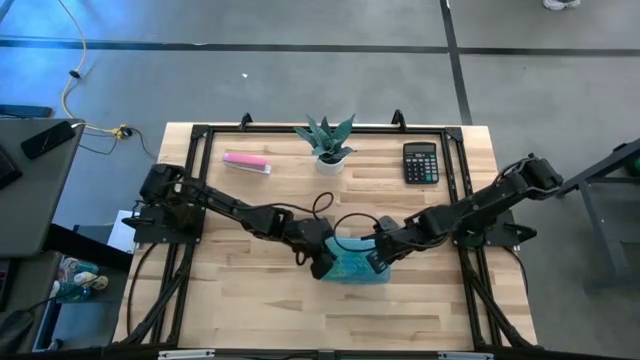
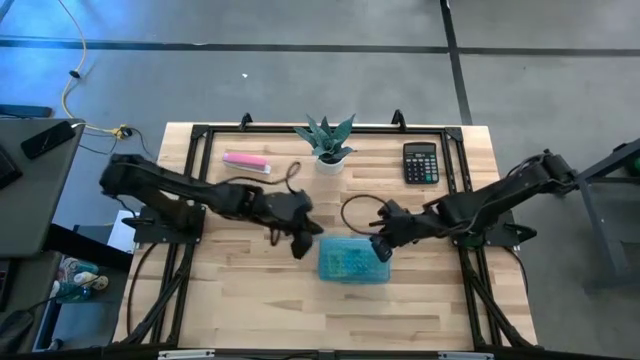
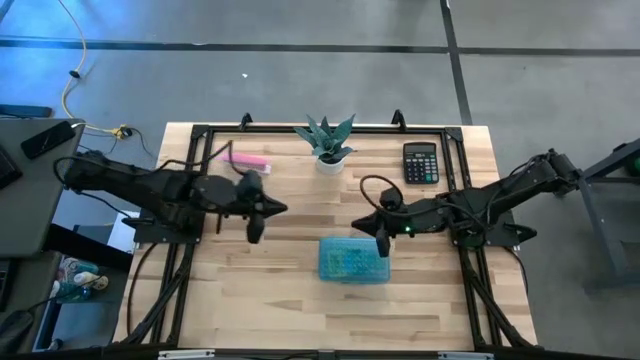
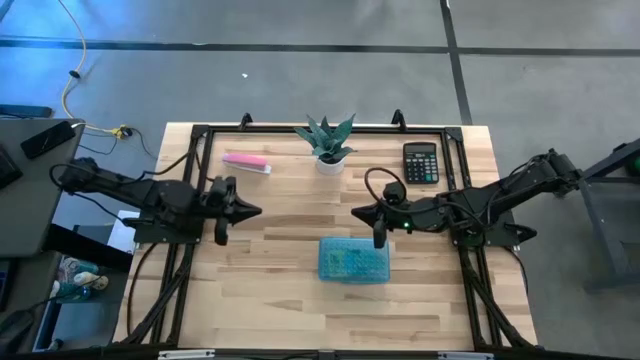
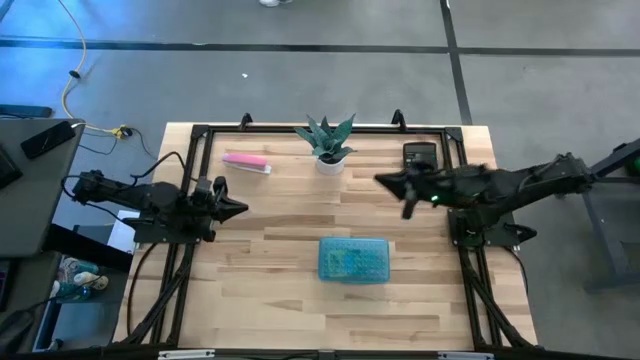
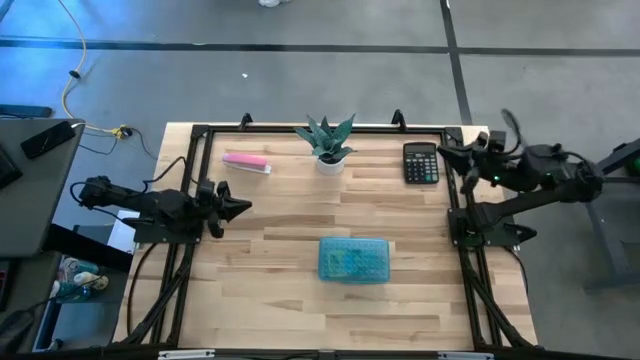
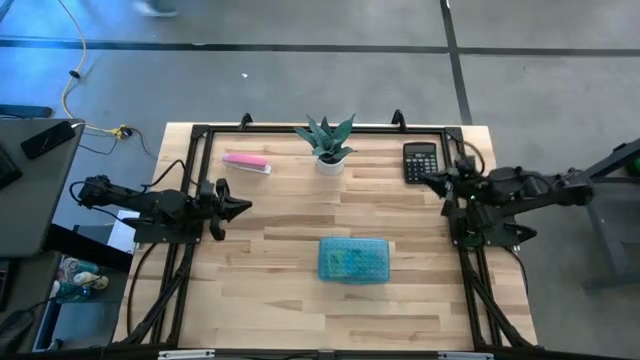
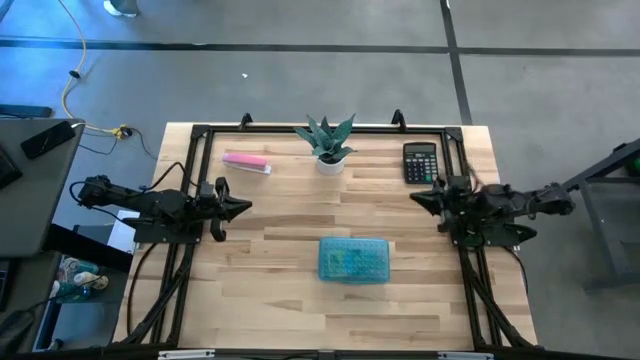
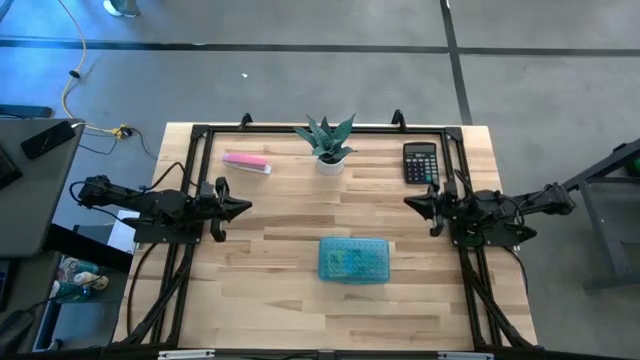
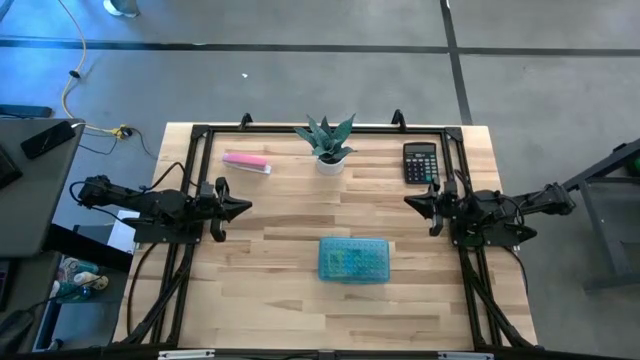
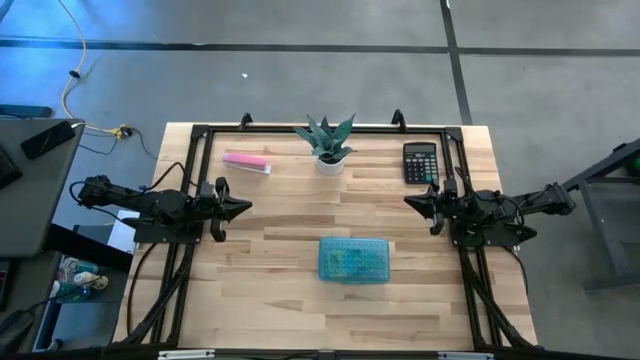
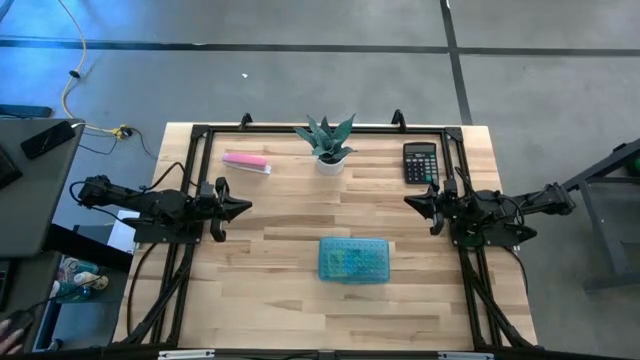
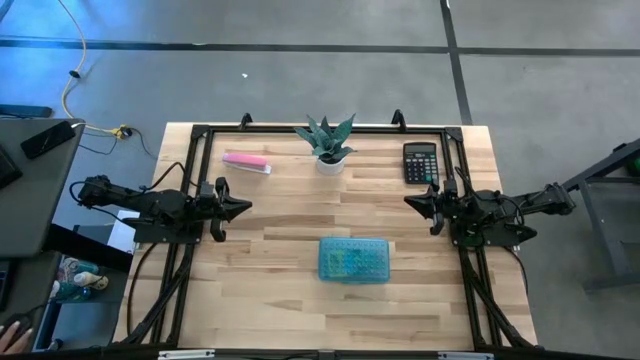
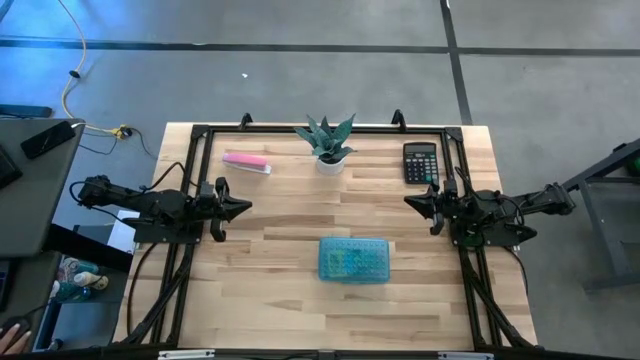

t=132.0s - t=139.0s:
Task: Pack school essentials
Return to Home Position

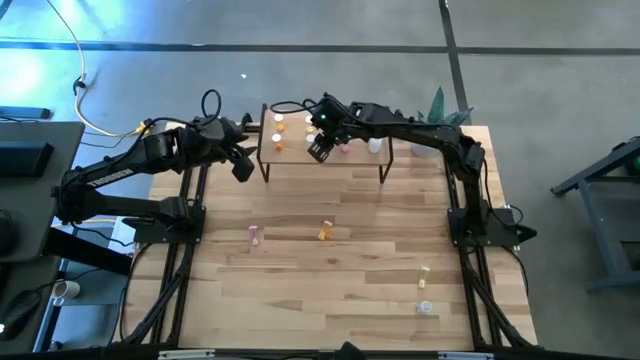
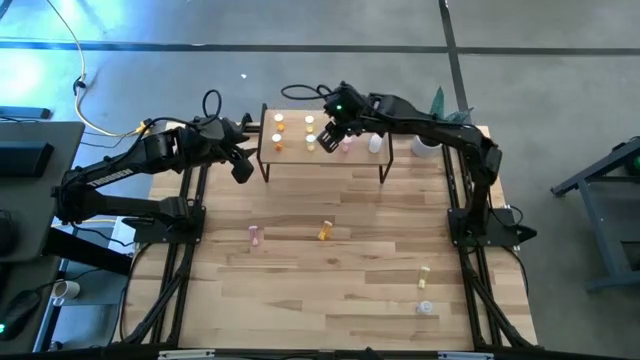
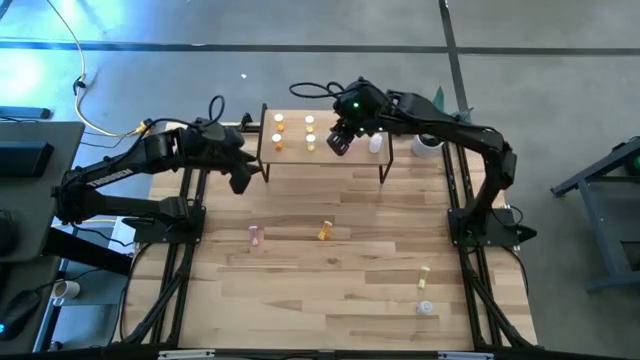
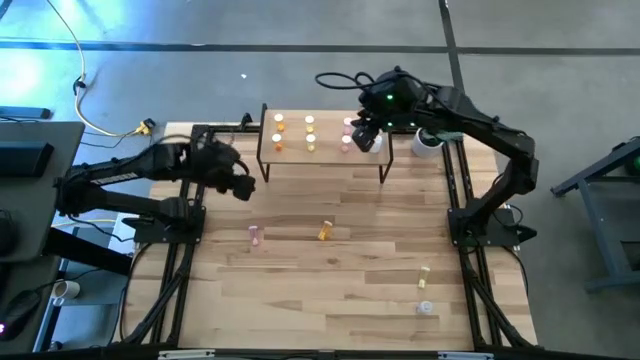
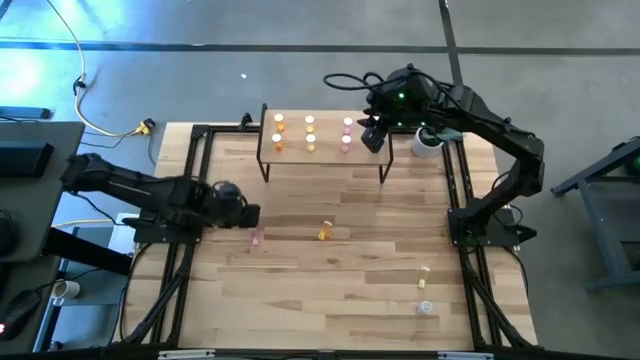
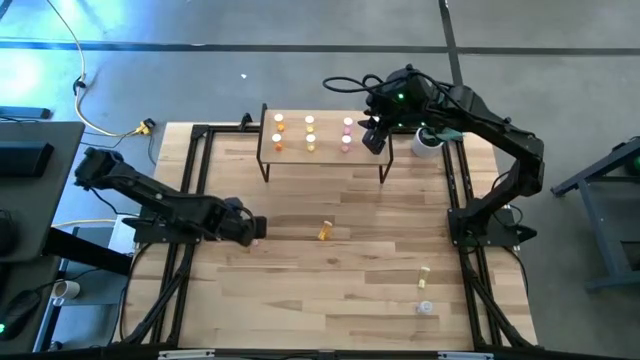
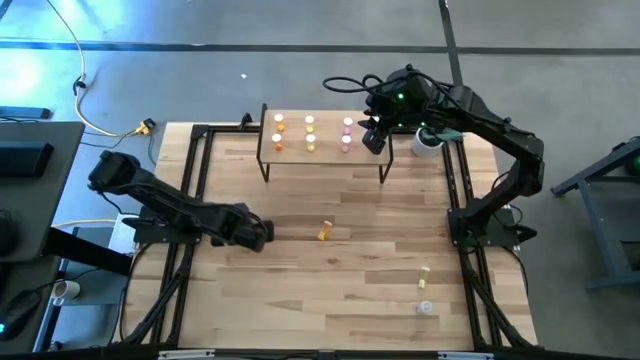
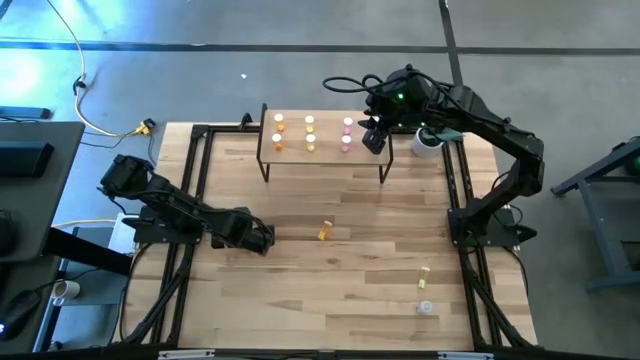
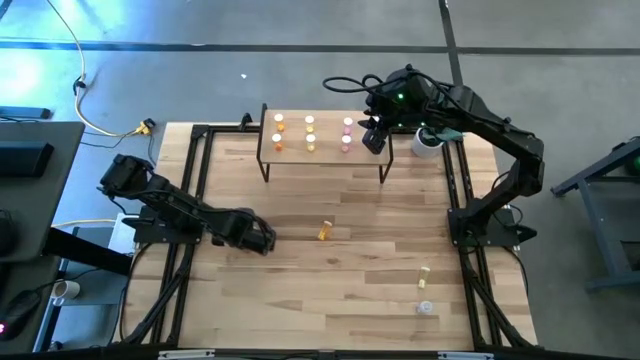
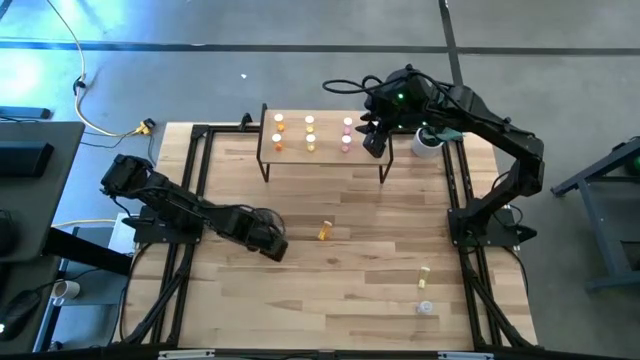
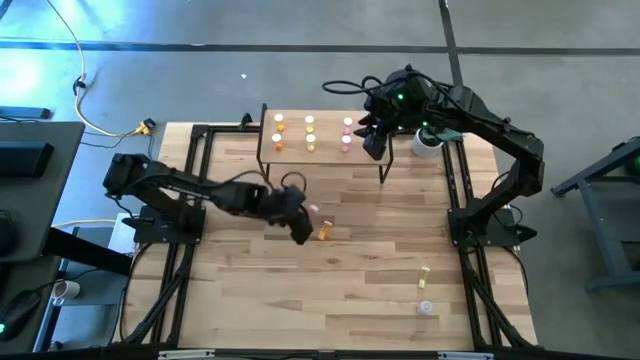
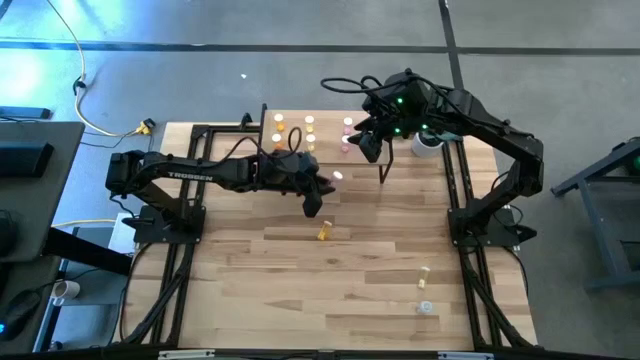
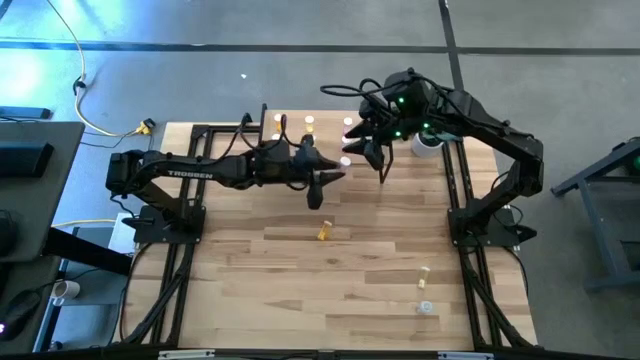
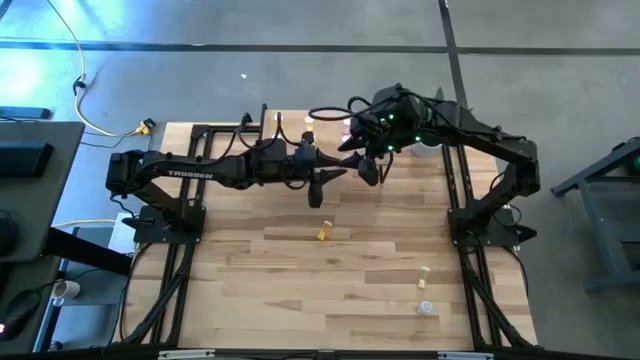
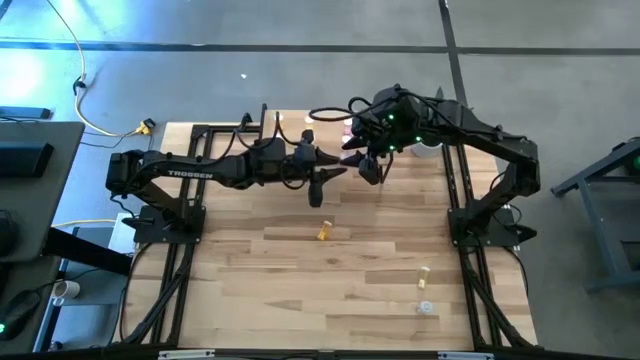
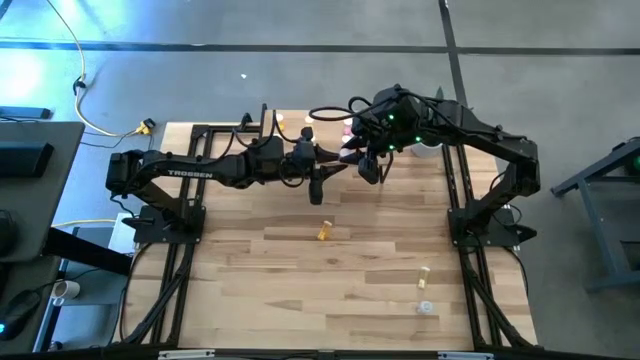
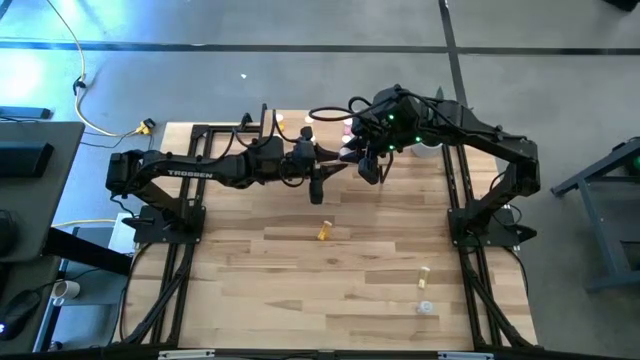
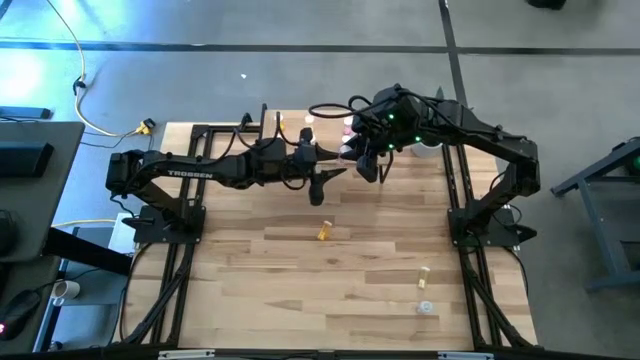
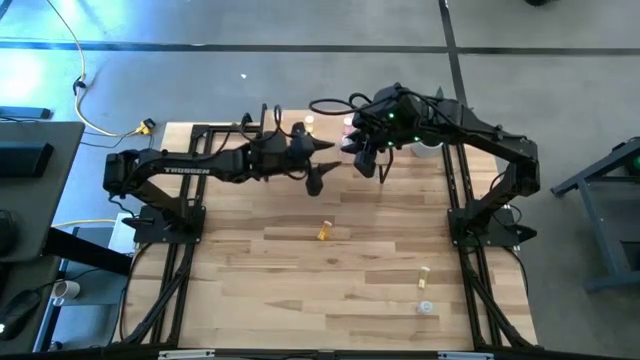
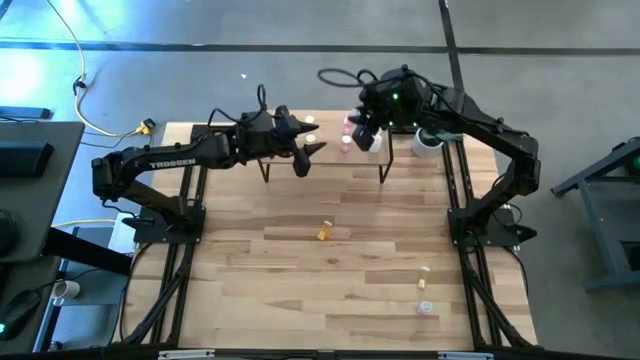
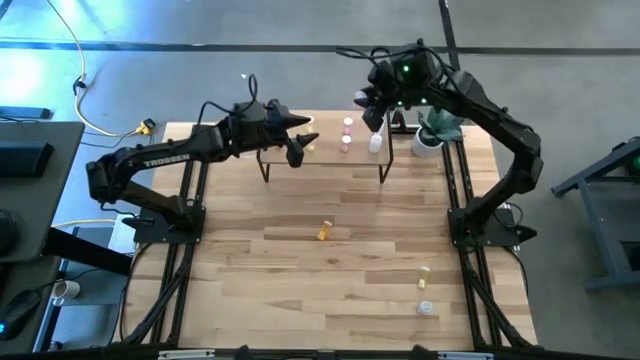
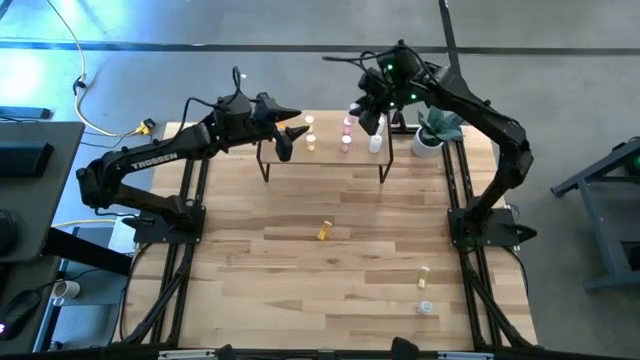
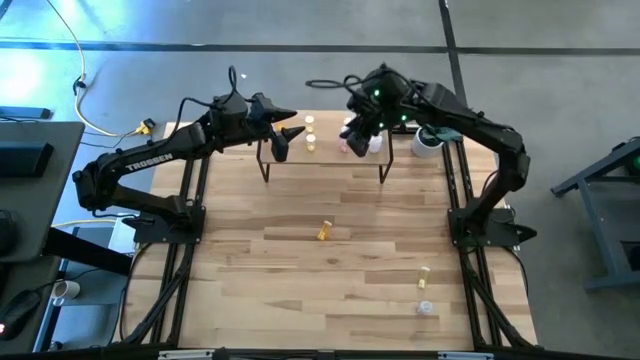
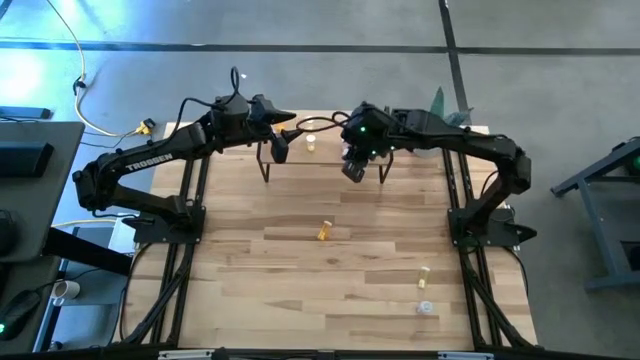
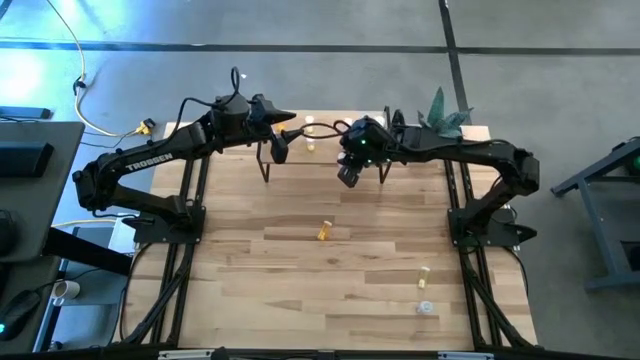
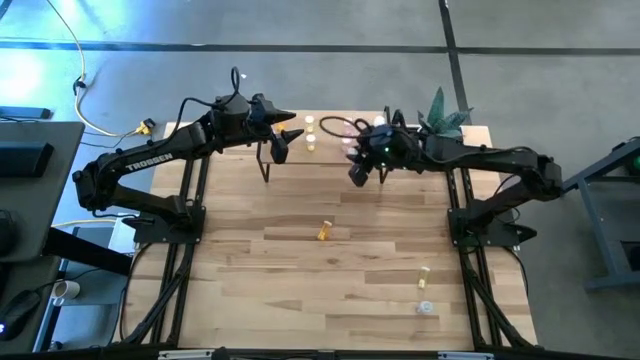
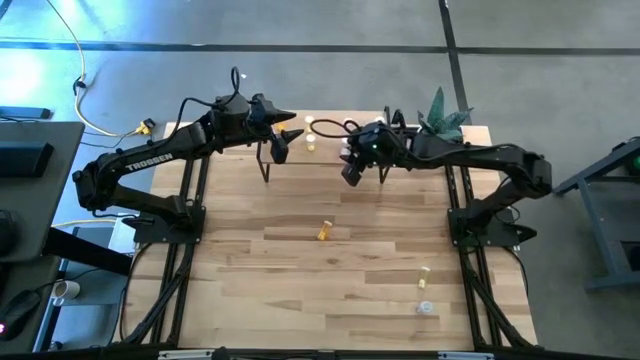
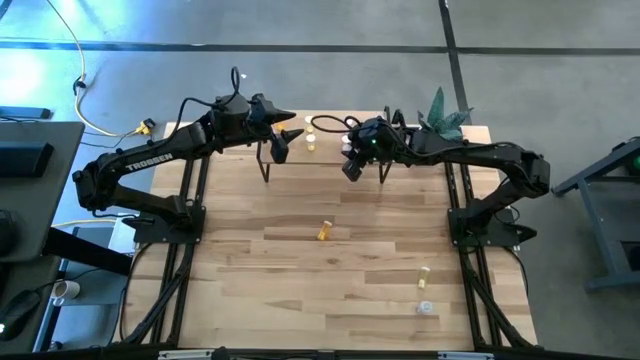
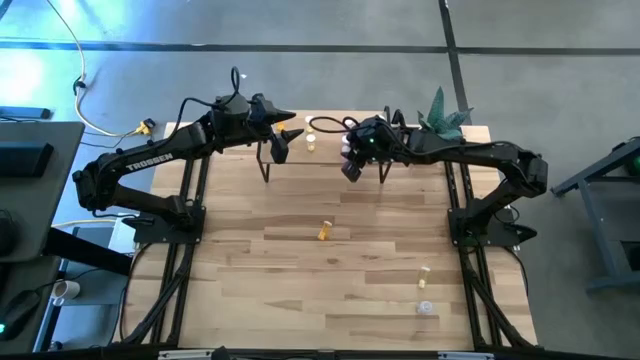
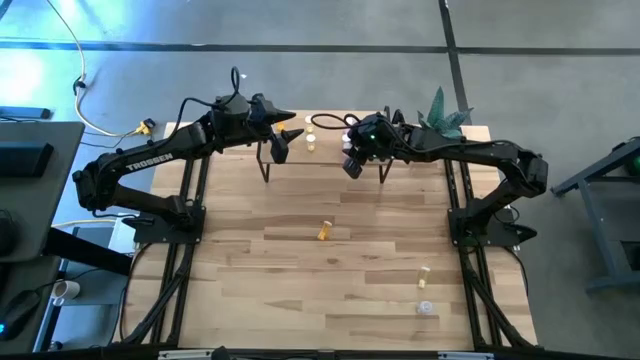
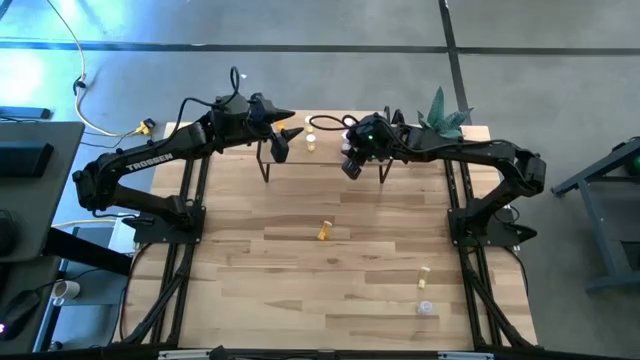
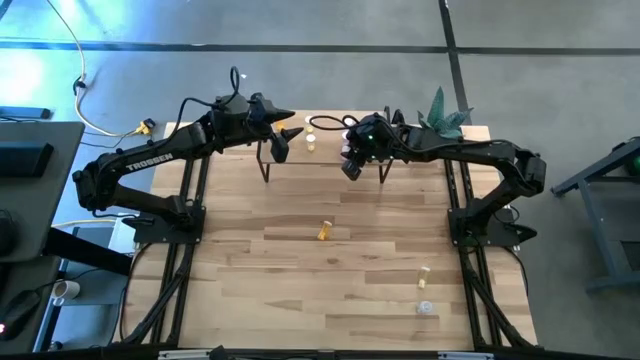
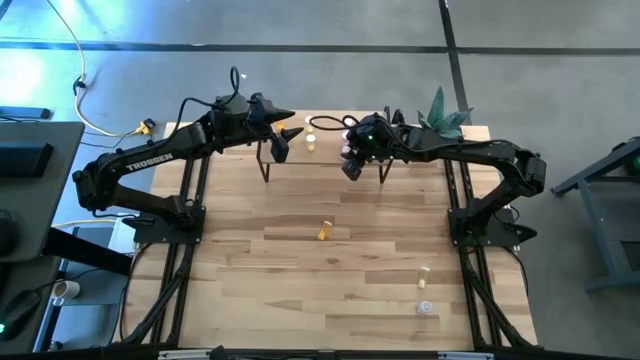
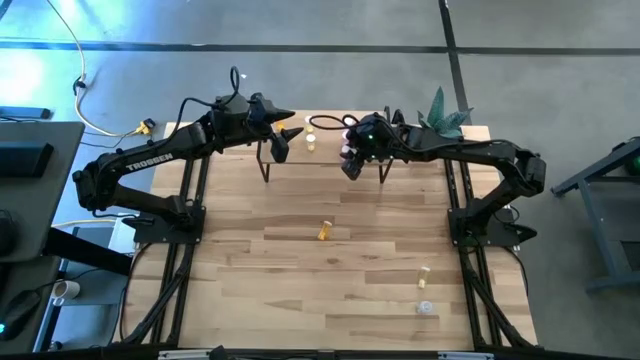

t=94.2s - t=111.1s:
Task: Pick and place medicine bottles onto shelf by color
Put the pink pill bottle on the shelf aligned with other pink pill bottles
